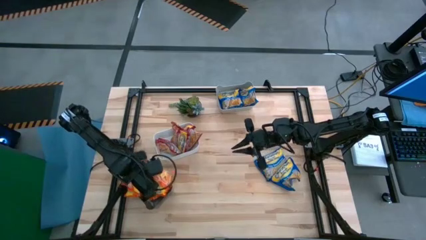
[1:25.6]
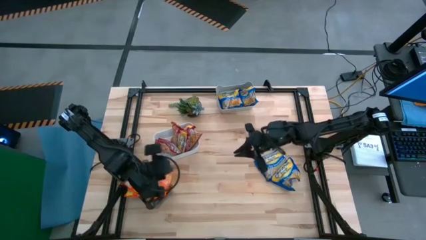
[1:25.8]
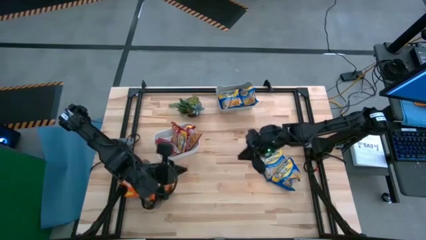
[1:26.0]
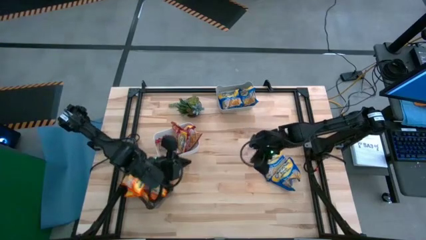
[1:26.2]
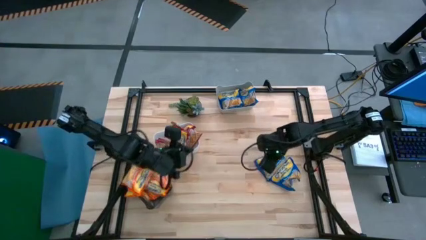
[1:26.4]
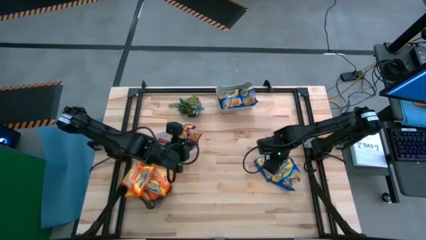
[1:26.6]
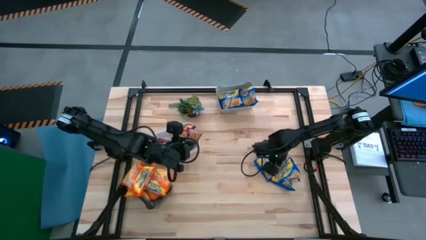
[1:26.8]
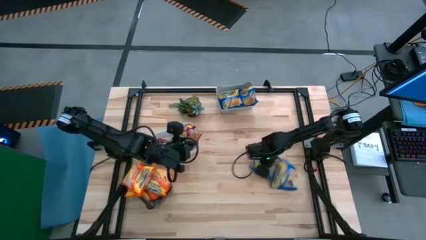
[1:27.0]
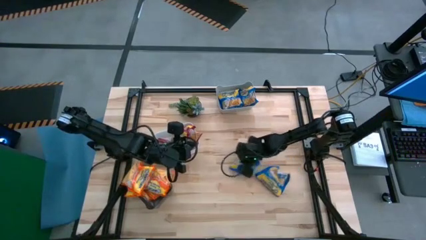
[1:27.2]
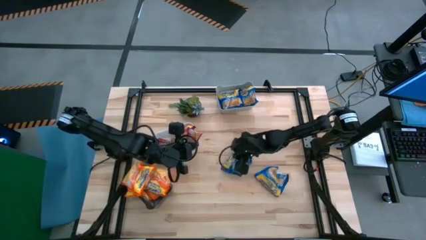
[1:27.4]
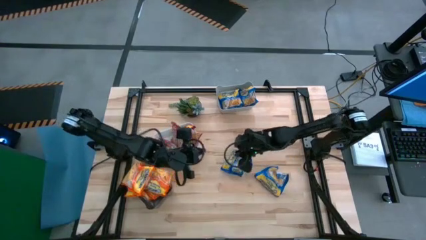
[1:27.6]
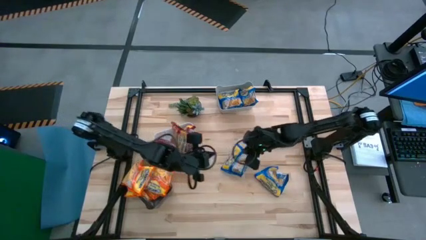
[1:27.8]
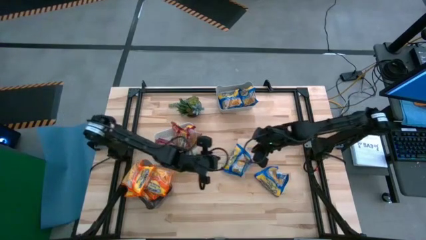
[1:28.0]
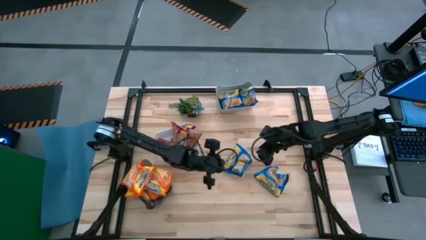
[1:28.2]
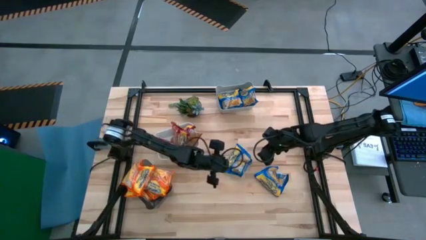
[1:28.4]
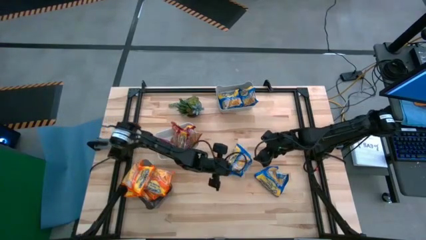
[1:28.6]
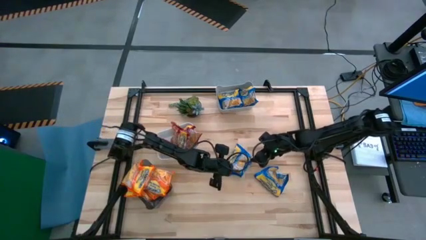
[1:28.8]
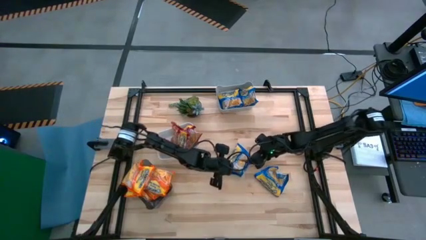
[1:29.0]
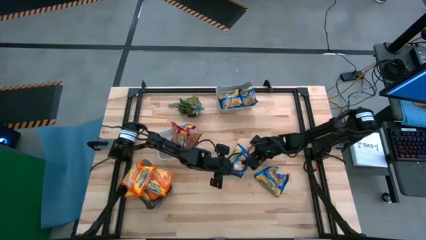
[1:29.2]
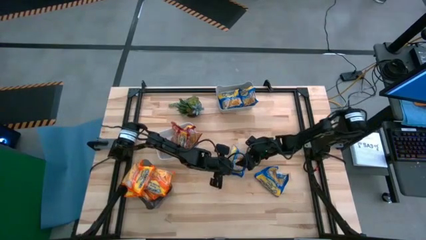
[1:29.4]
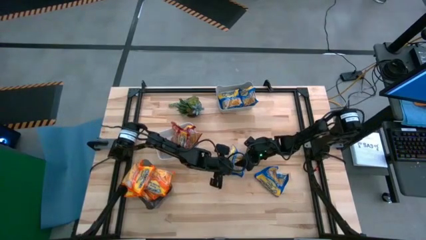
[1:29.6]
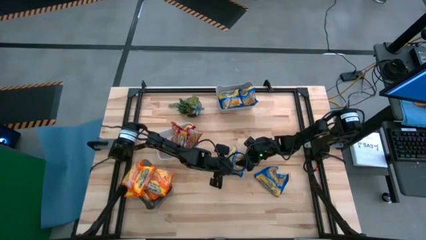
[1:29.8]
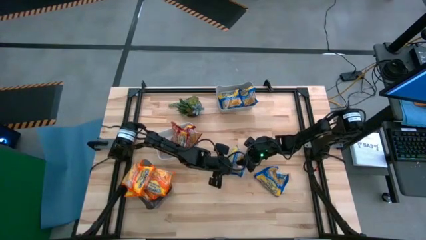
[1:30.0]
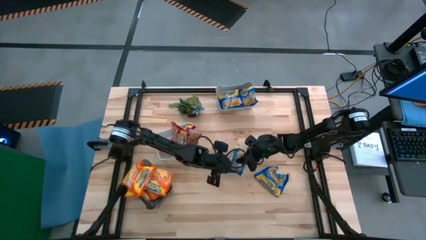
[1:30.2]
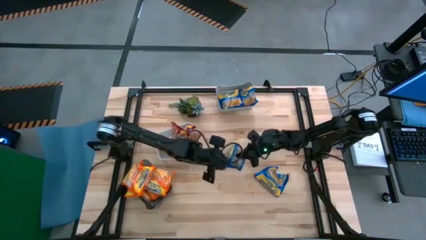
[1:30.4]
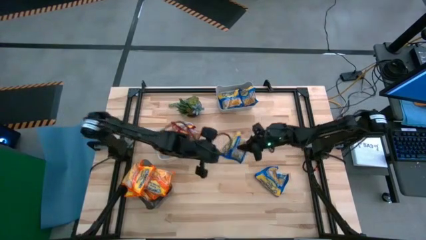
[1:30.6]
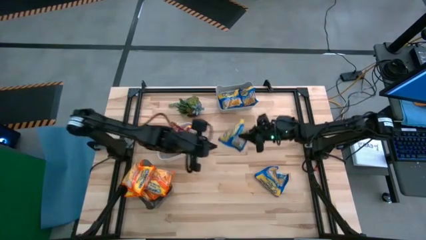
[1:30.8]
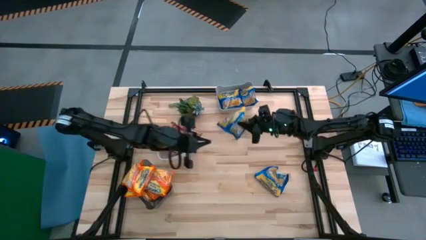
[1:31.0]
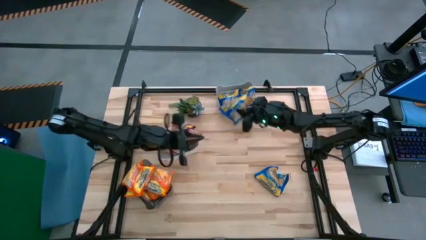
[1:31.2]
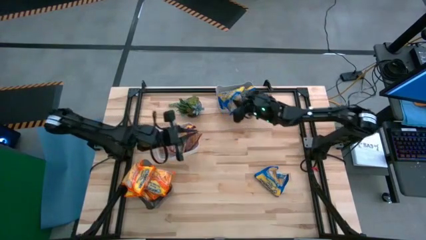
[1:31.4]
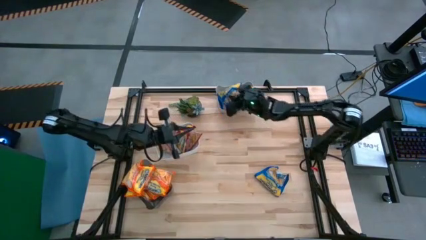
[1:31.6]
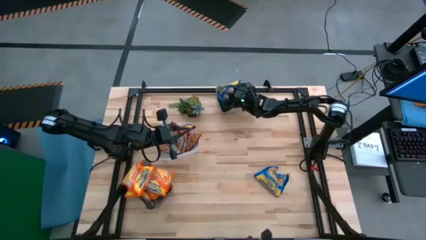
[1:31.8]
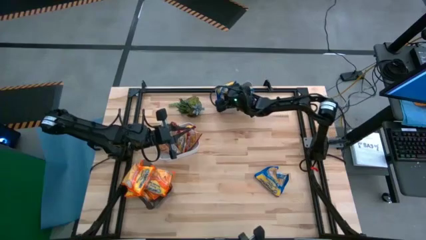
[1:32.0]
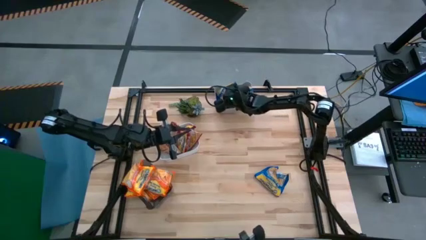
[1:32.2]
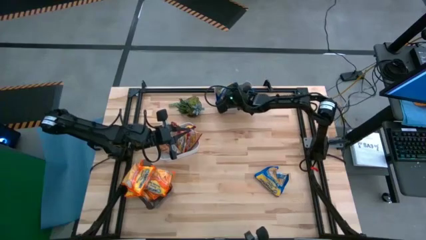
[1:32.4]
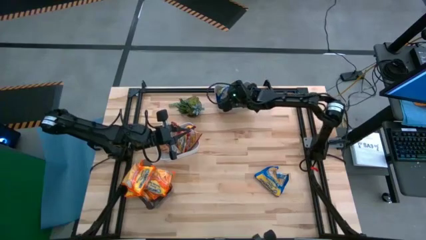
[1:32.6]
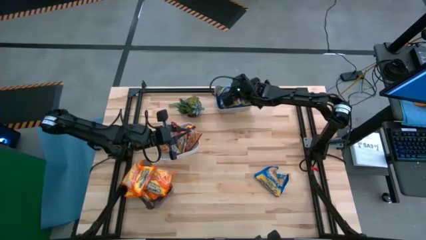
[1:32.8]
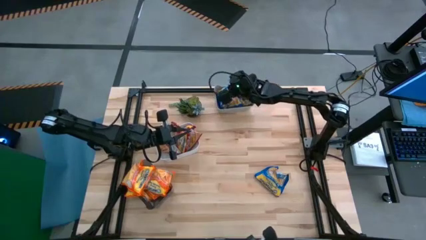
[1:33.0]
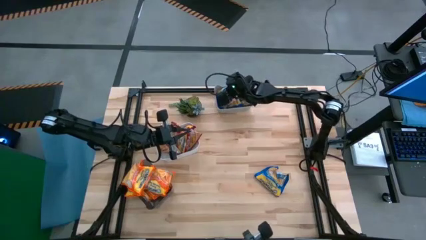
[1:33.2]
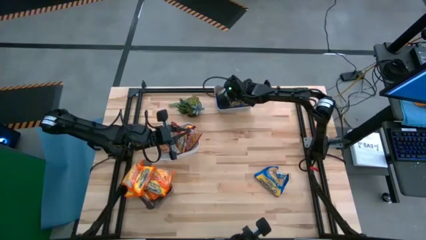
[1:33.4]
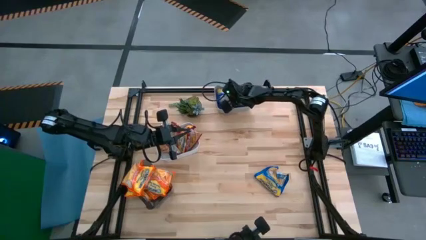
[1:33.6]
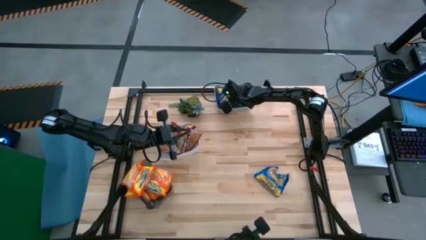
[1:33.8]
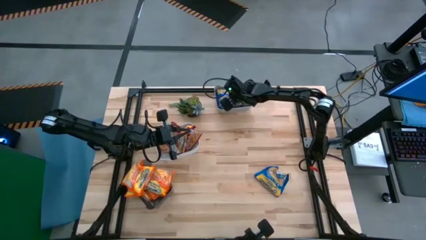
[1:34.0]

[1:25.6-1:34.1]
Task: Sort Maruchan noodles
Put the blue noodle pack into the gray bin

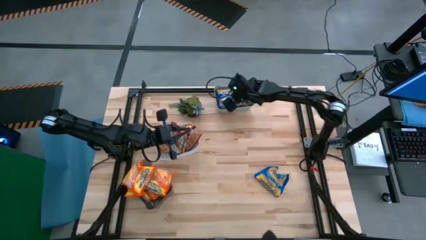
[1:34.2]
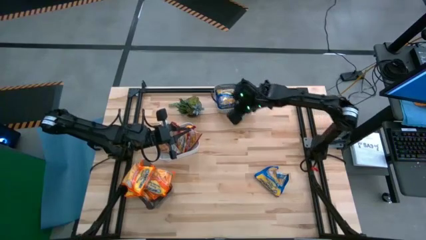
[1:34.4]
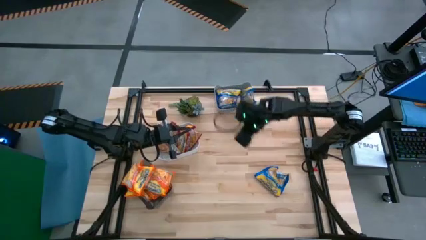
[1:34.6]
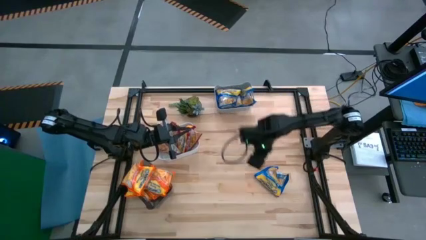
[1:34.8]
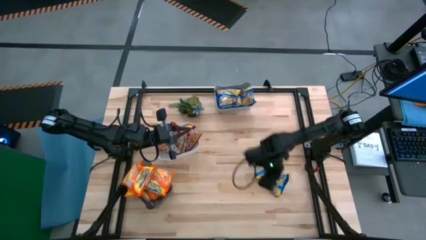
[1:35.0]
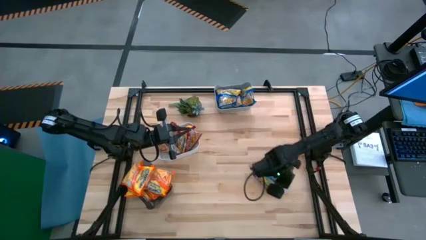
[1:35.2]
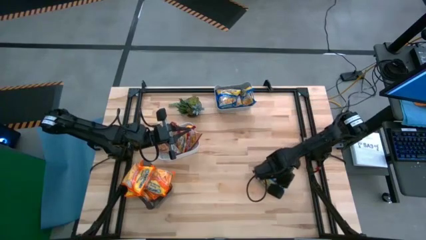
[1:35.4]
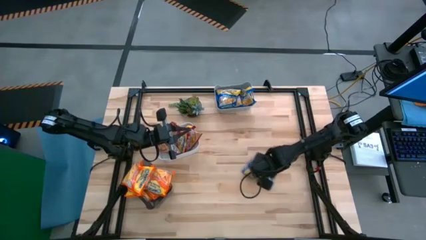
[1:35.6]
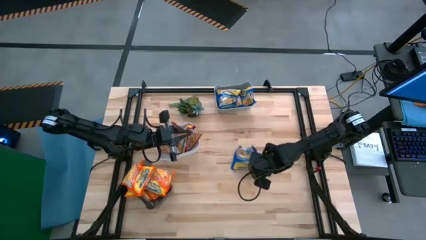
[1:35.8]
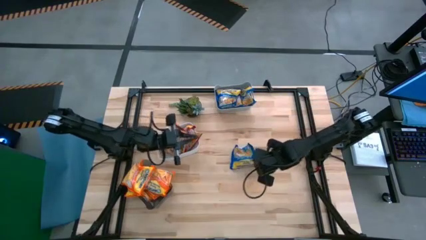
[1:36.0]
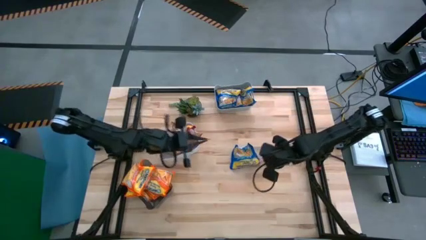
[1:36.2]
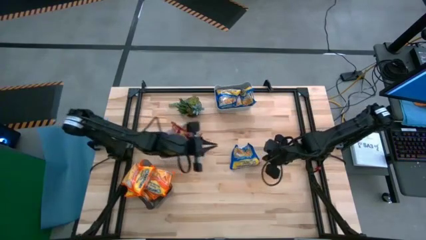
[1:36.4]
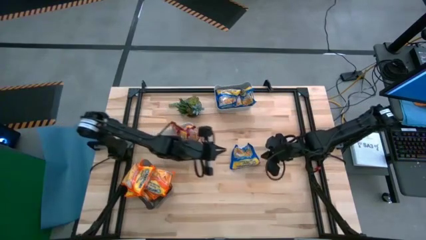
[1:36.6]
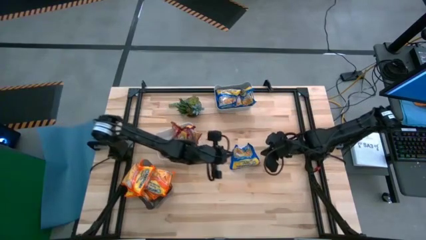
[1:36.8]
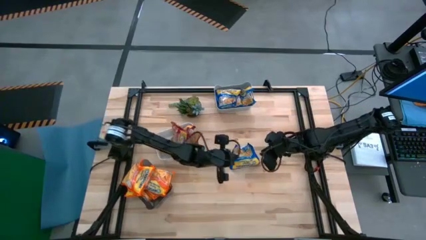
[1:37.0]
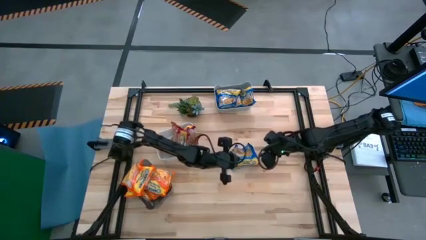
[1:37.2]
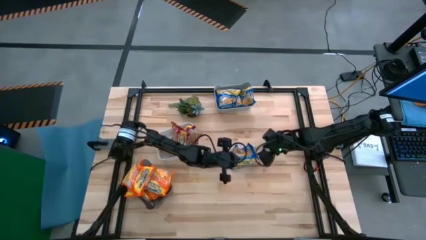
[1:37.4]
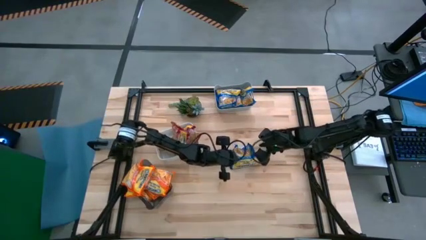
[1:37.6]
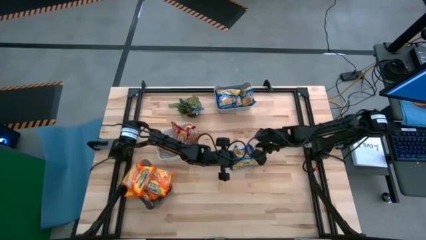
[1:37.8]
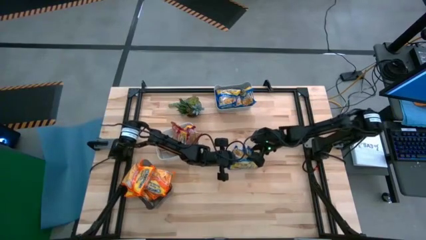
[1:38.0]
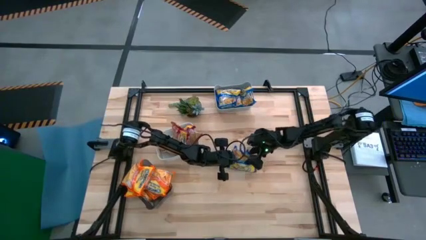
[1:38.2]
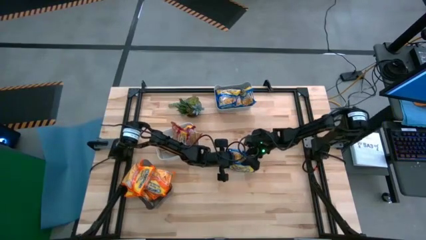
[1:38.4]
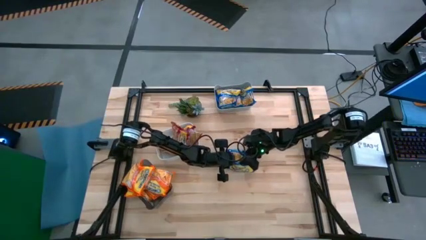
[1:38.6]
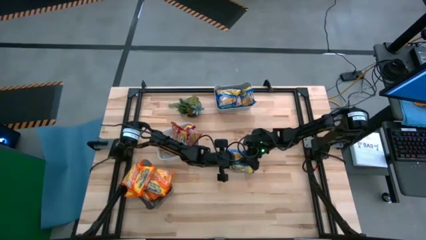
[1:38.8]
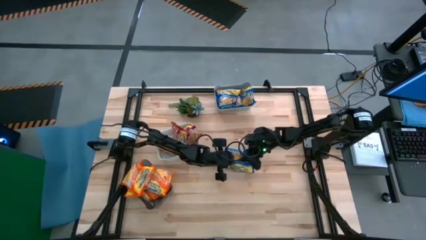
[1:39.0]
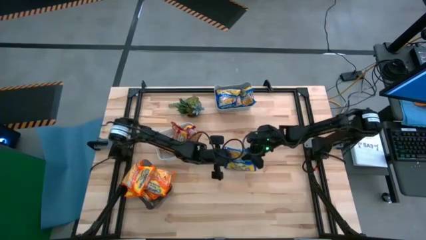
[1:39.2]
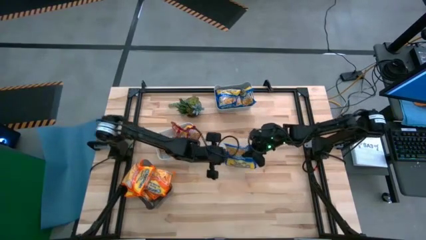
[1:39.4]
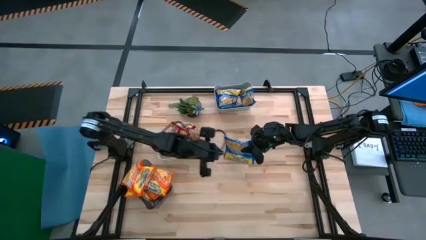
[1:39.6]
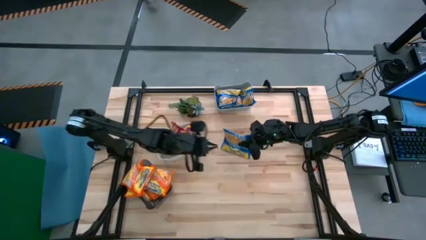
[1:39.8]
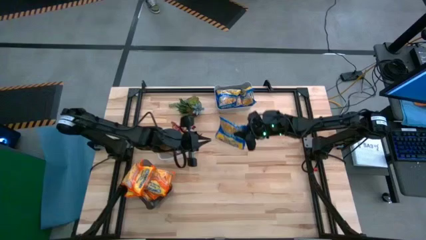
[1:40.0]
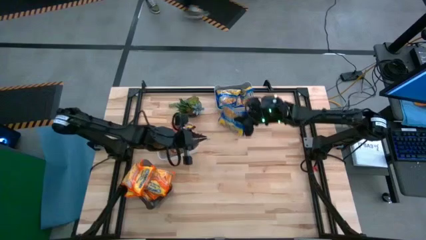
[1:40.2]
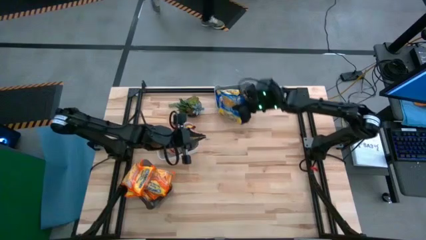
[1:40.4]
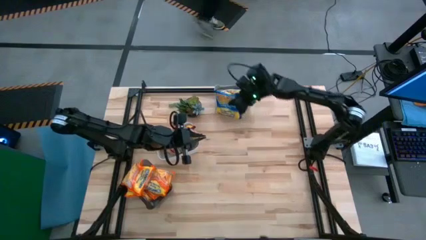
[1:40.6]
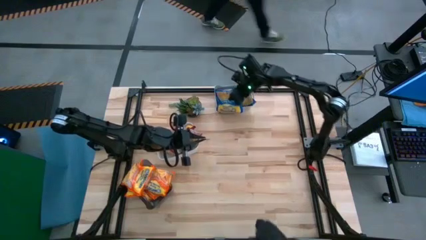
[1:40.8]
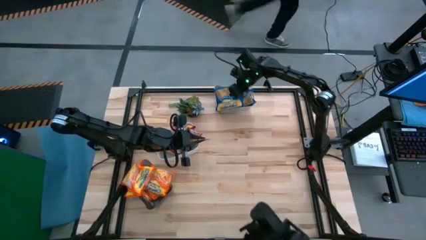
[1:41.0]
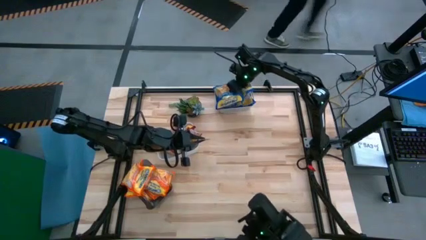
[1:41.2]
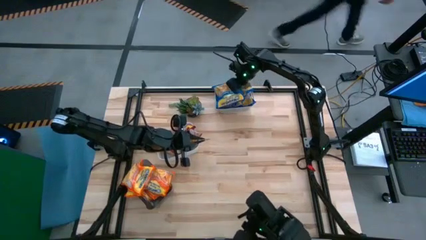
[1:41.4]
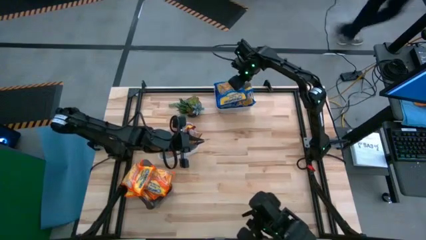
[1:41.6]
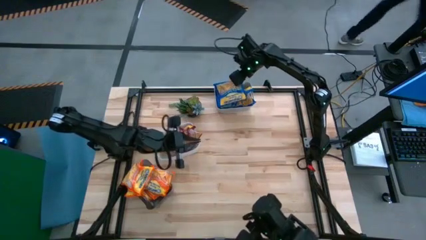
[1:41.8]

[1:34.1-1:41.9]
Put the blue noodle pack into the gray bin
